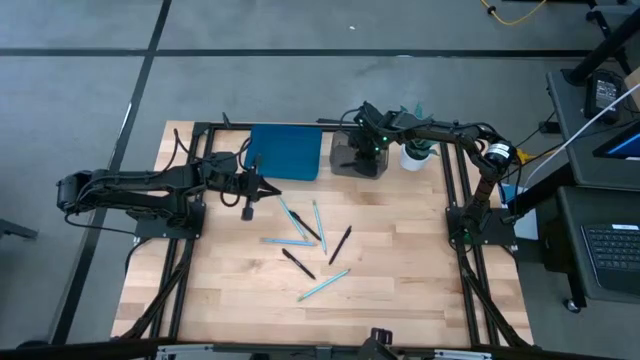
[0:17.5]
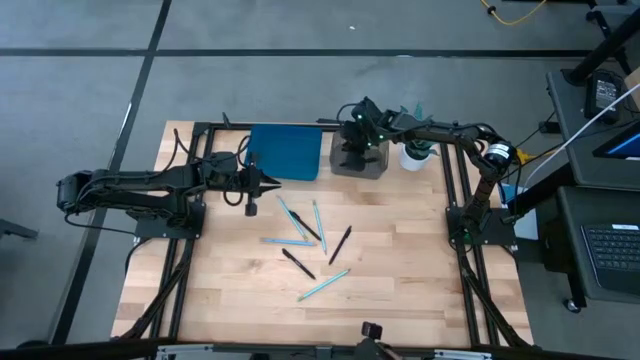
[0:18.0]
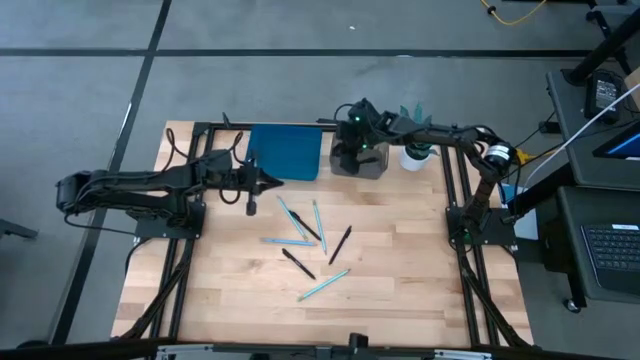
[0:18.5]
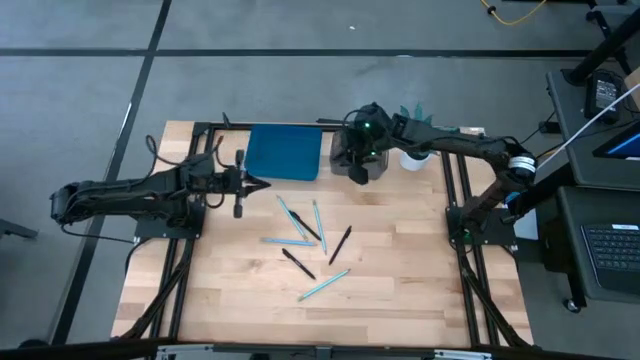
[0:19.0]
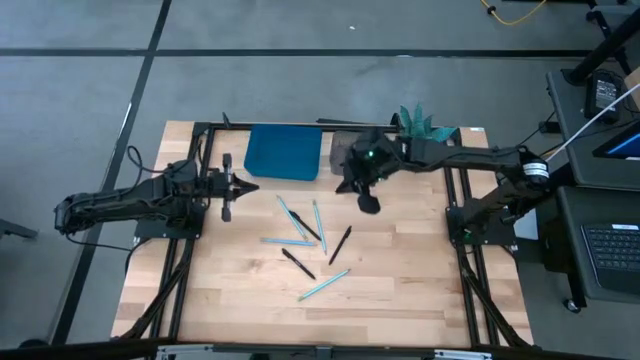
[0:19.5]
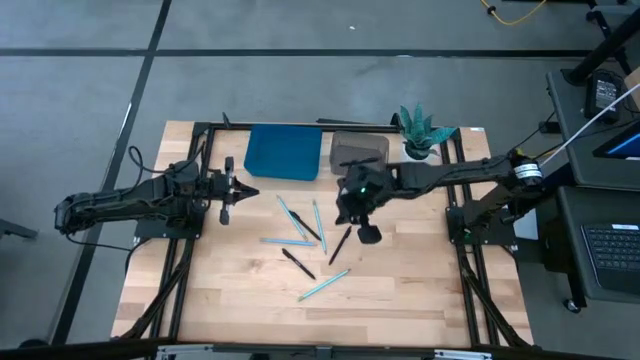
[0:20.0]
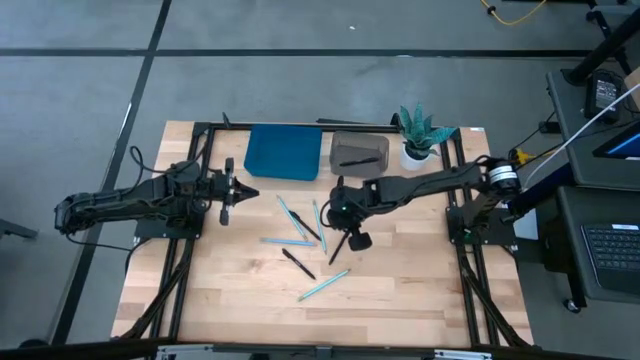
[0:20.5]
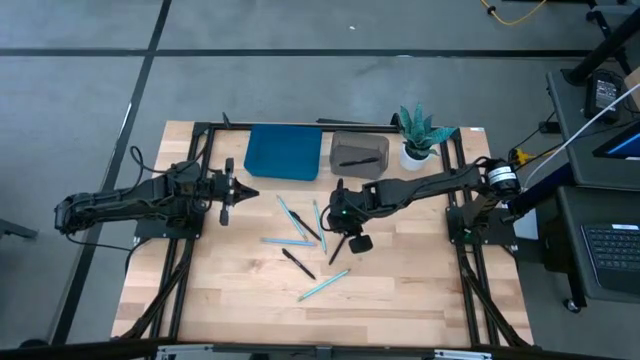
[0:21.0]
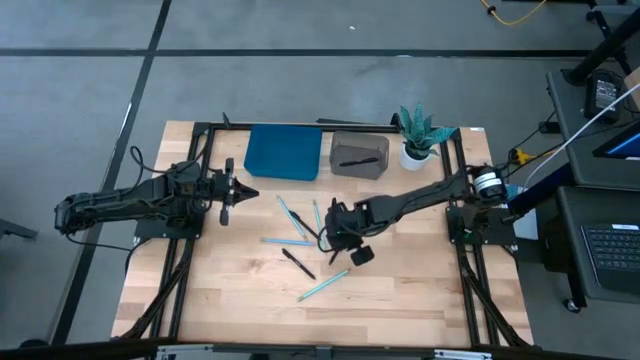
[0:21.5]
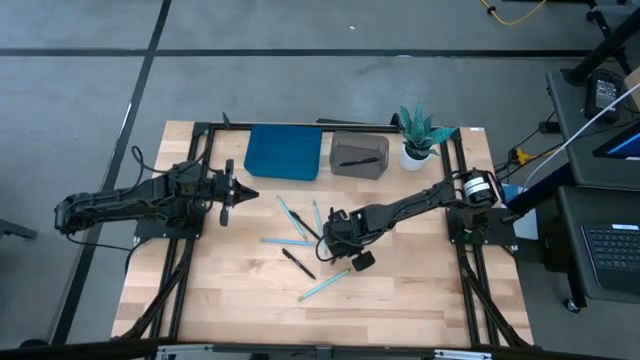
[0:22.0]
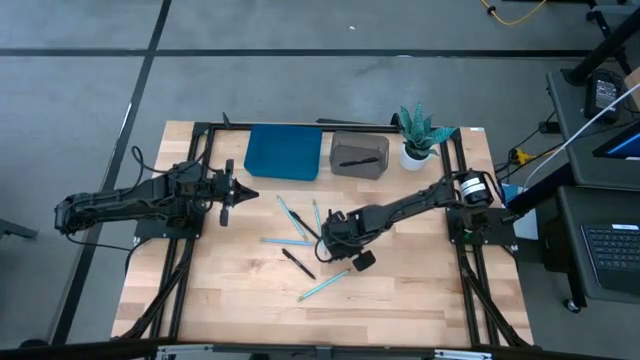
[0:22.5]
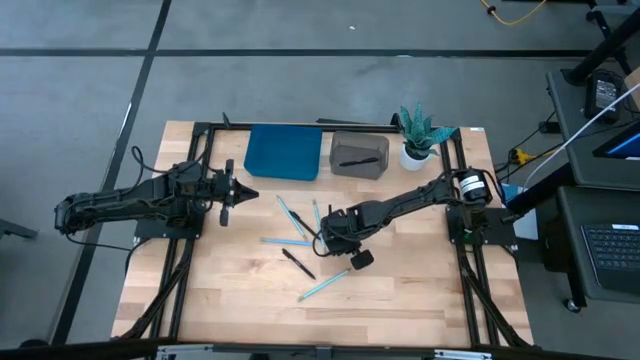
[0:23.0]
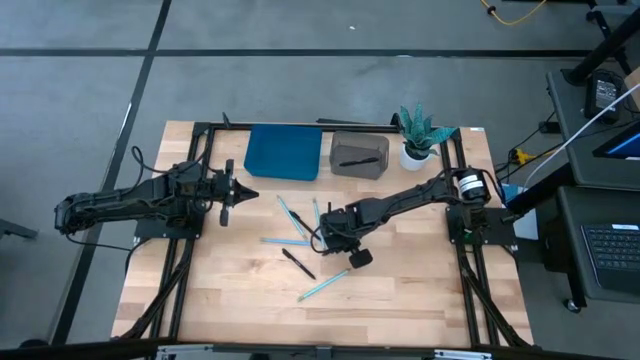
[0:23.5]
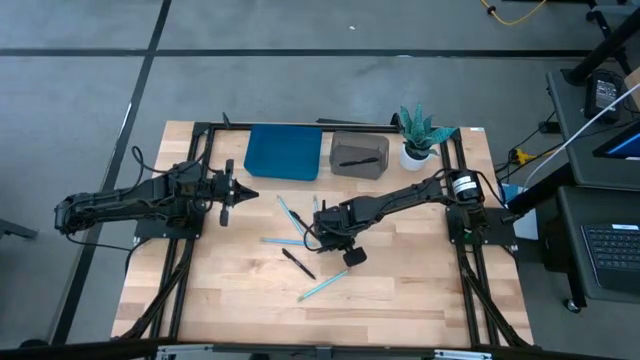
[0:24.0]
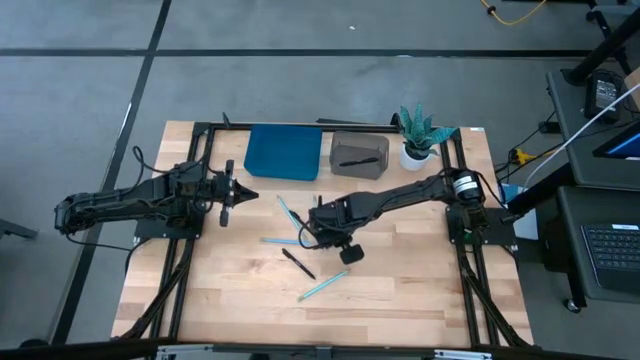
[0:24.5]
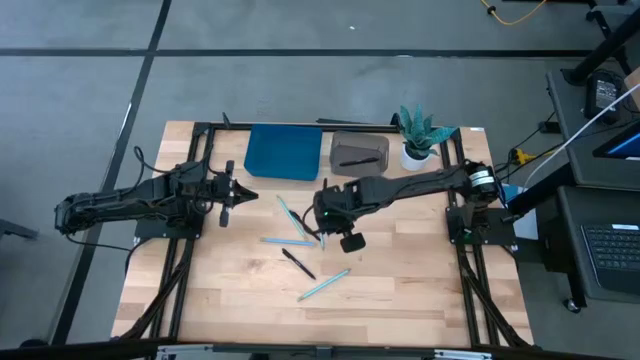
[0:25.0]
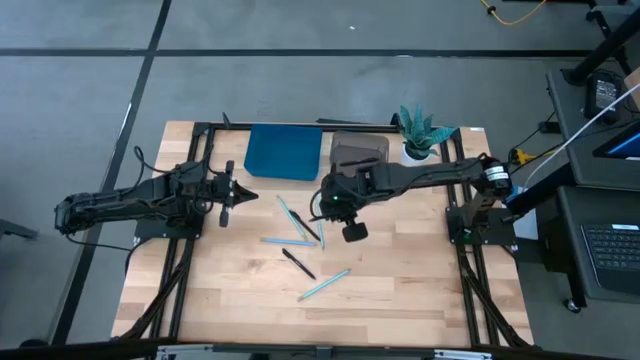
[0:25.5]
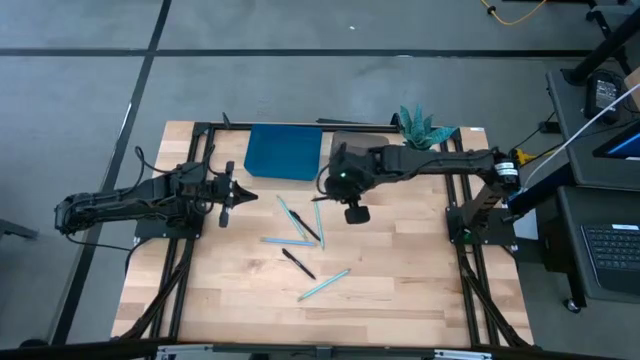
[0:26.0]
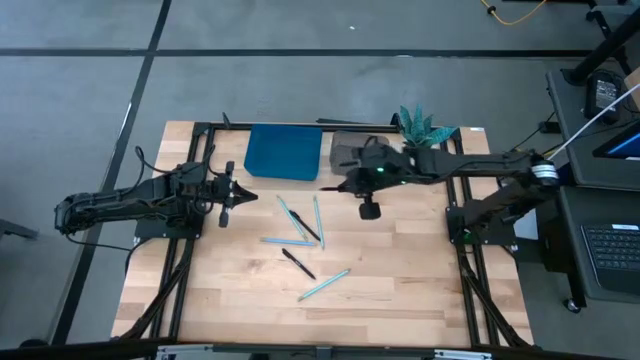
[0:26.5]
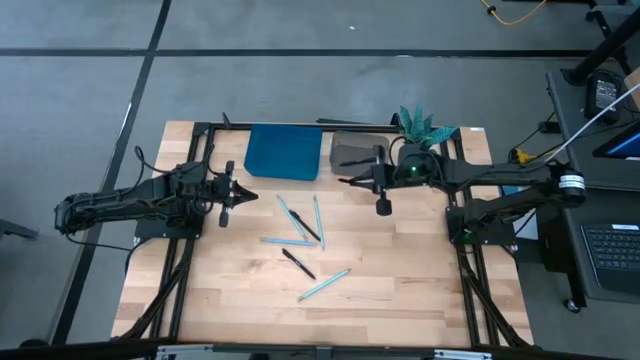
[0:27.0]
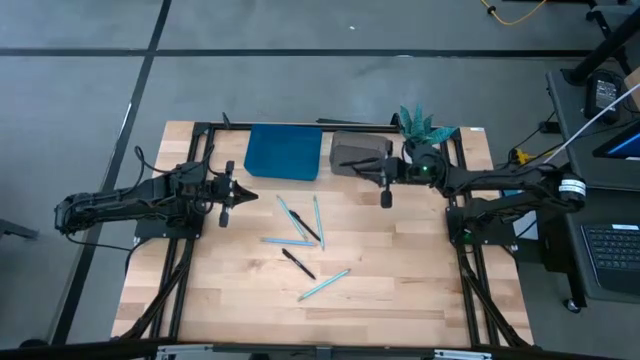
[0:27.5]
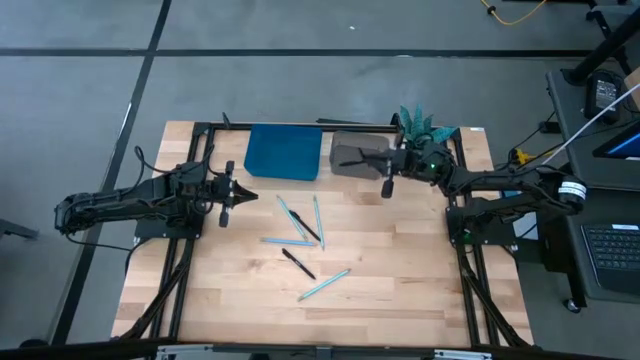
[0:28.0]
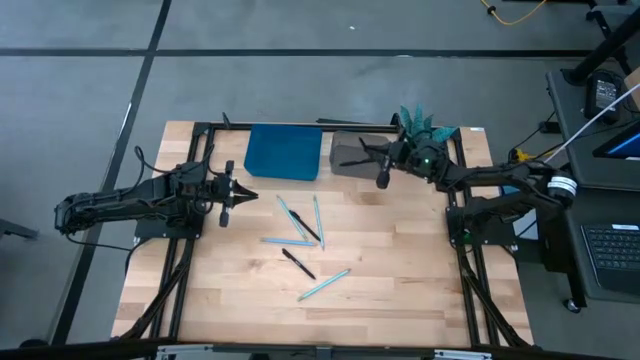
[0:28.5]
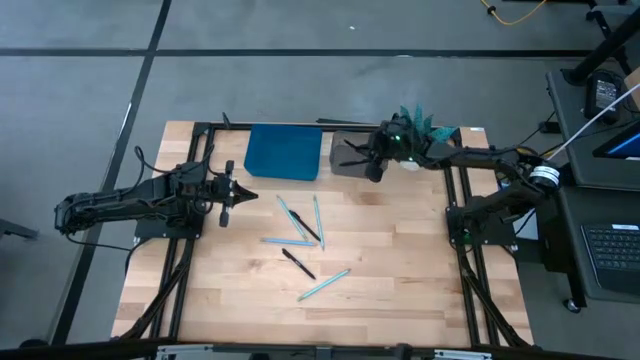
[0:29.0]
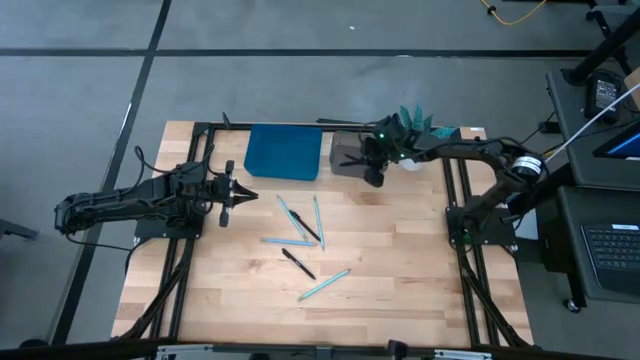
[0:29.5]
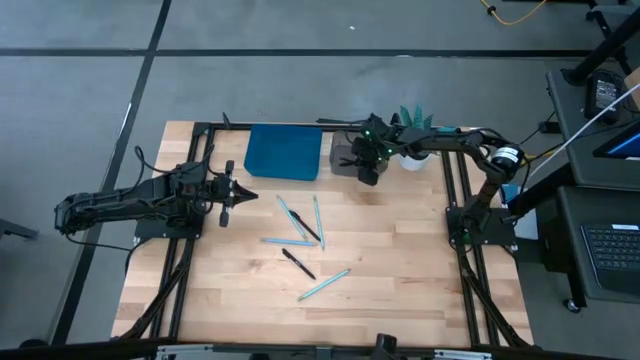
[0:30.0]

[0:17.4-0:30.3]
Task: Sort pens & pencils
Put the black pen into the black bin

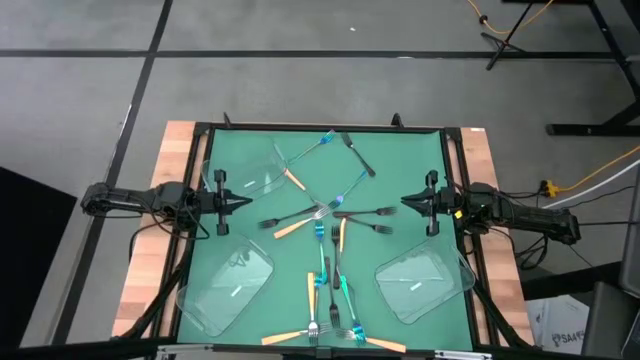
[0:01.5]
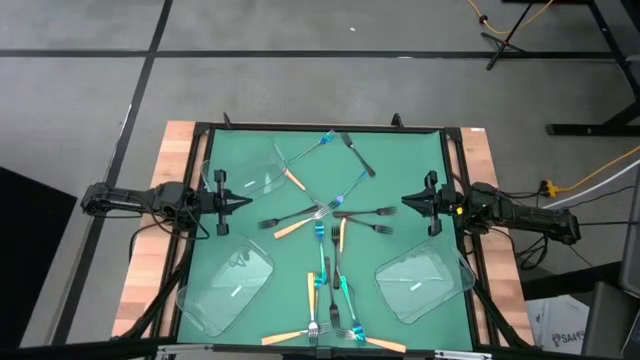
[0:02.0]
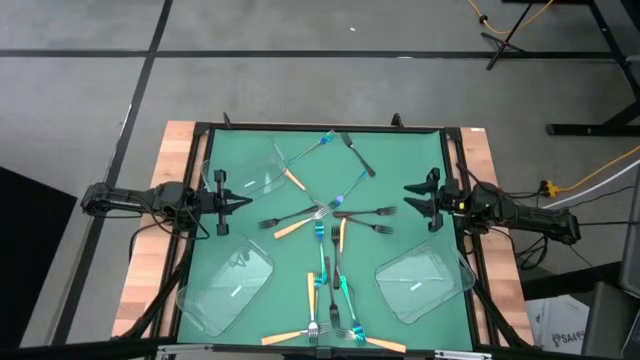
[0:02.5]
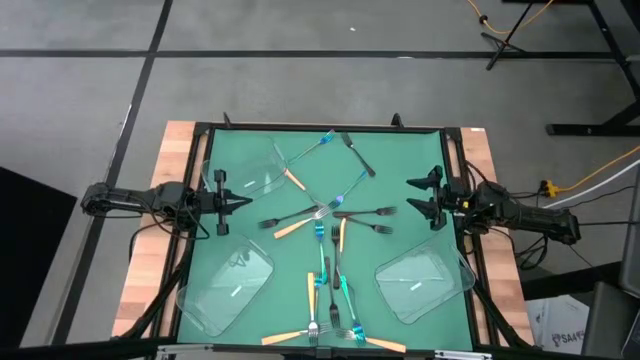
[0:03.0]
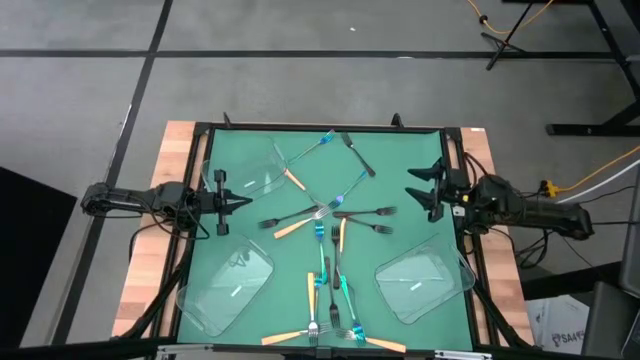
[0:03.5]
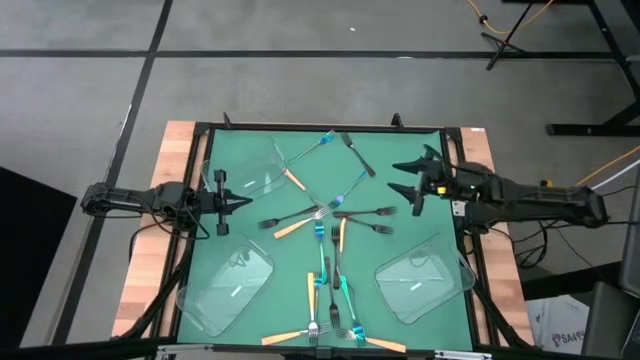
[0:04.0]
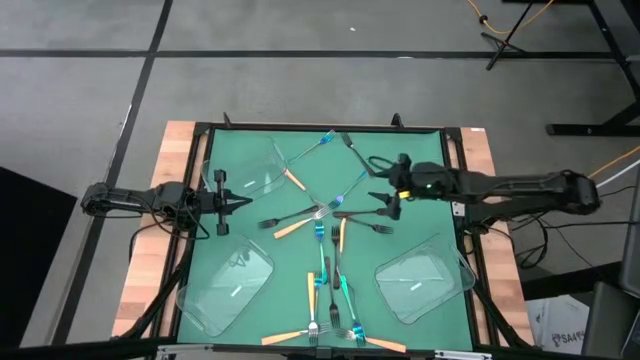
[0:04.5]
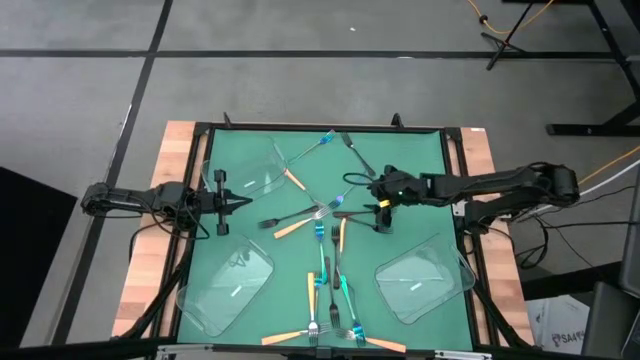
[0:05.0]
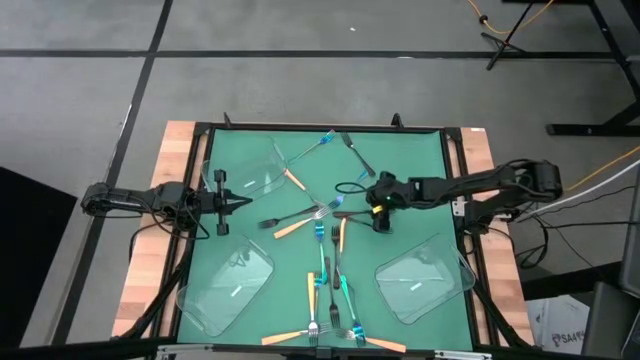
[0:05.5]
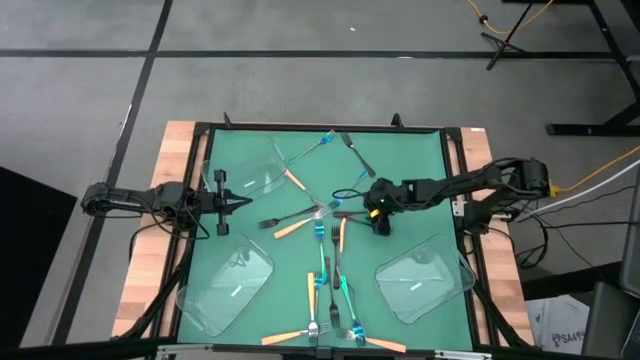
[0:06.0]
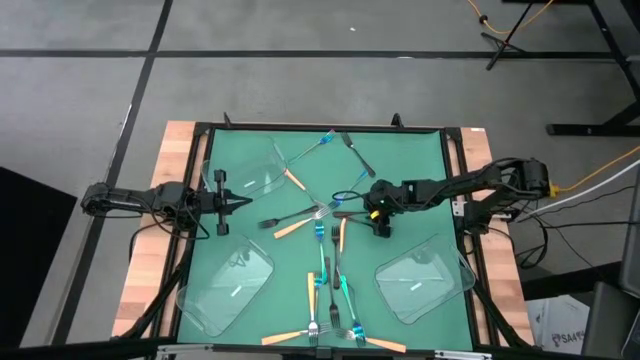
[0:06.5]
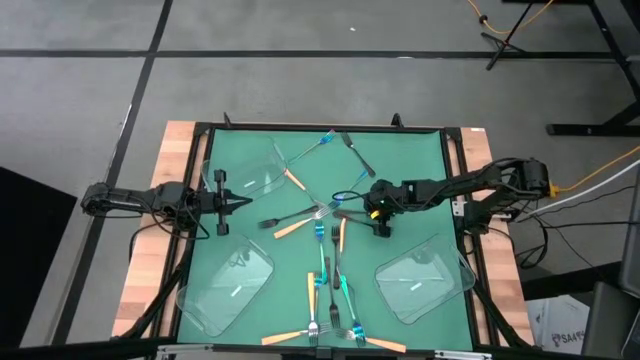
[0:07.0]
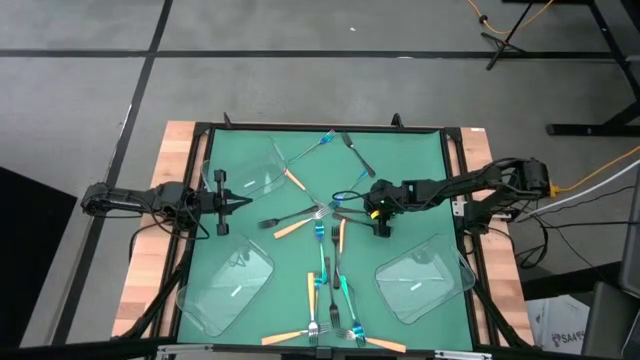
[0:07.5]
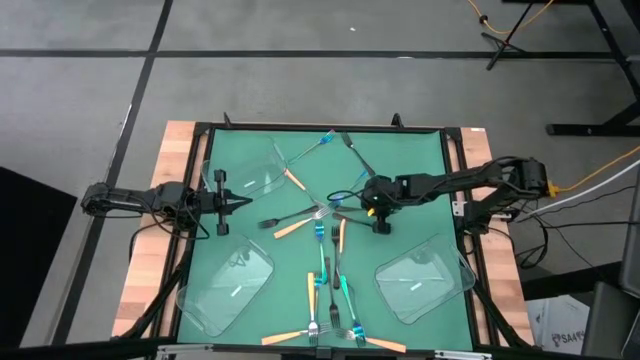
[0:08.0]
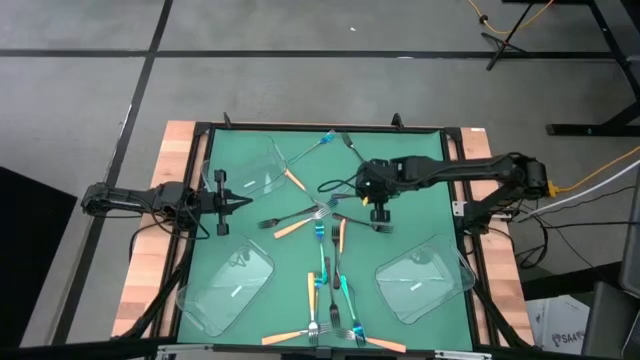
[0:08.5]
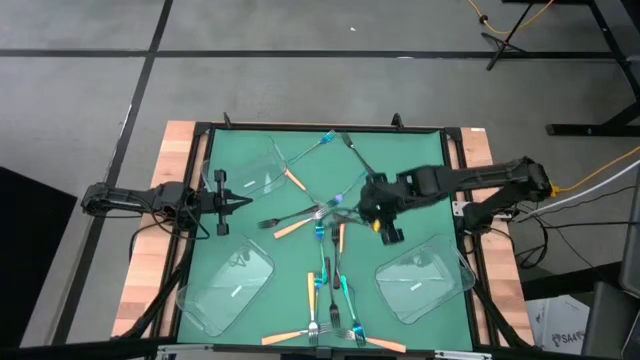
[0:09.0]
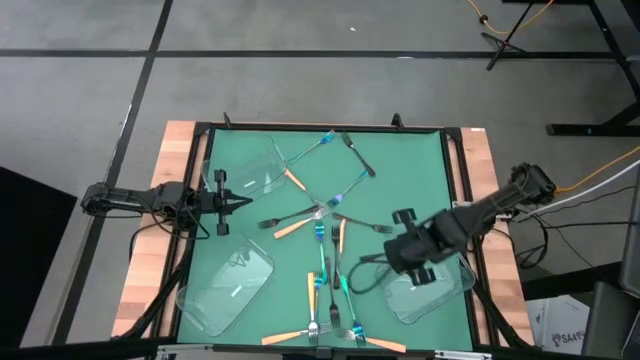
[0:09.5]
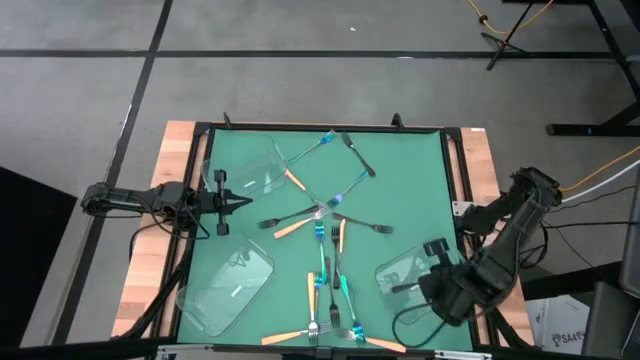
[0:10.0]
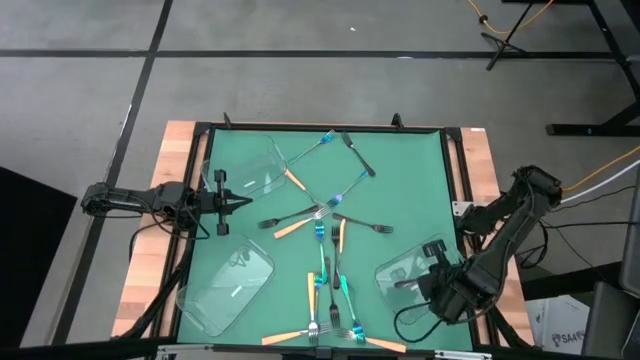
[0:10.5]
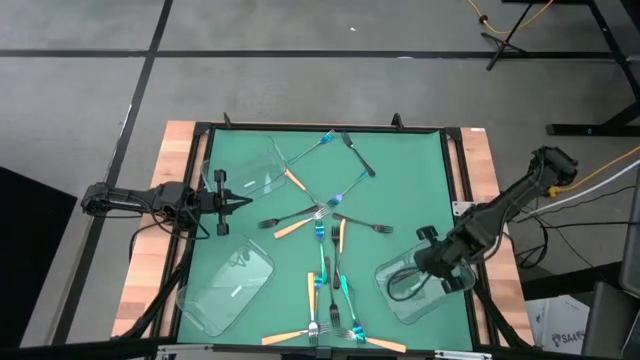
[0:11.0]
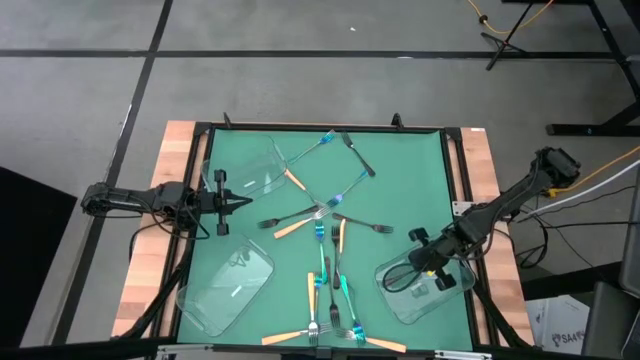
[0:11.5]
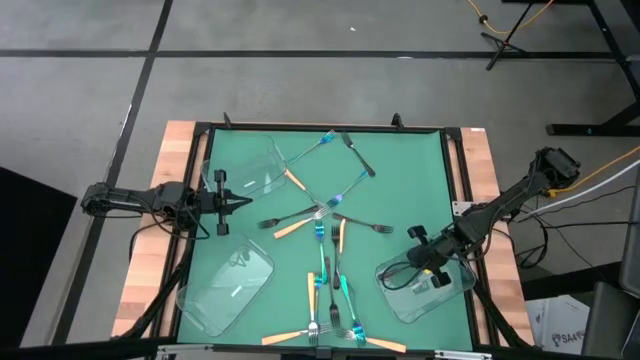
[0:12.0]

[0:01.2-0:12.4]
Task: Sort silverware by color (type)
Put the black fork into the bottom right transparent bin
